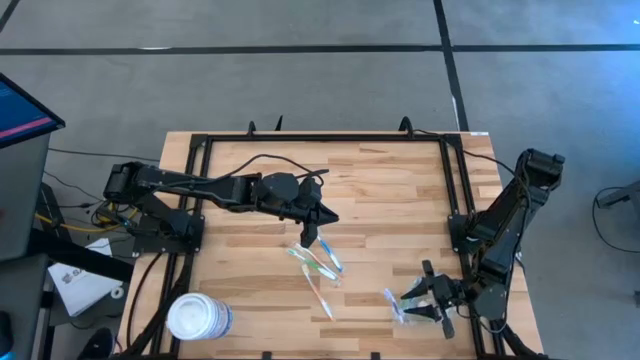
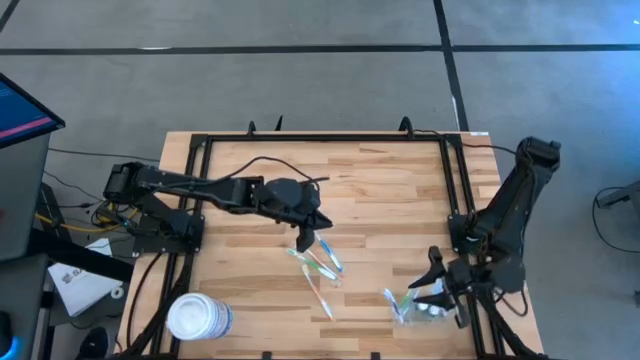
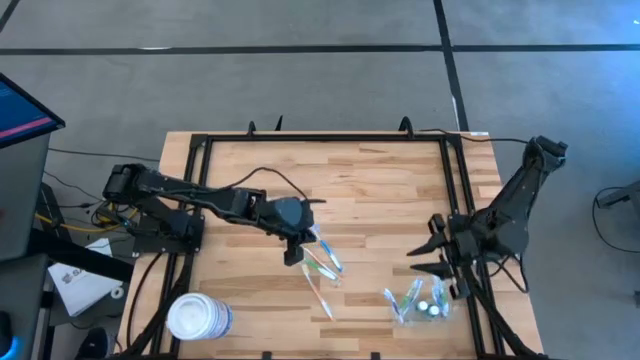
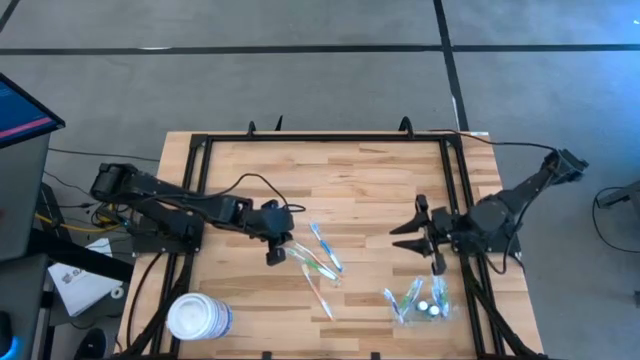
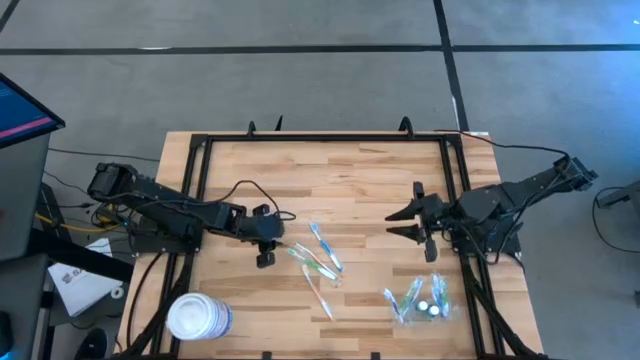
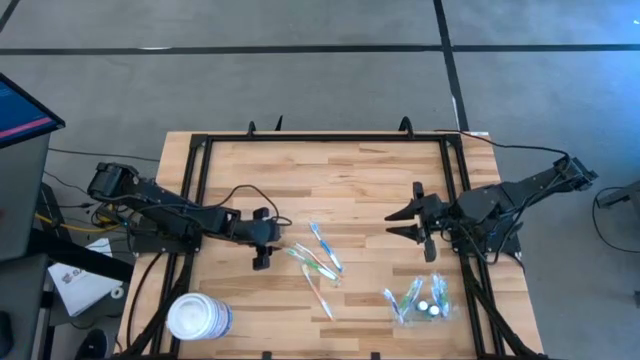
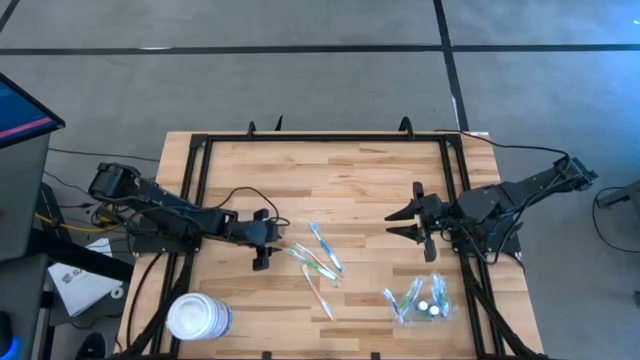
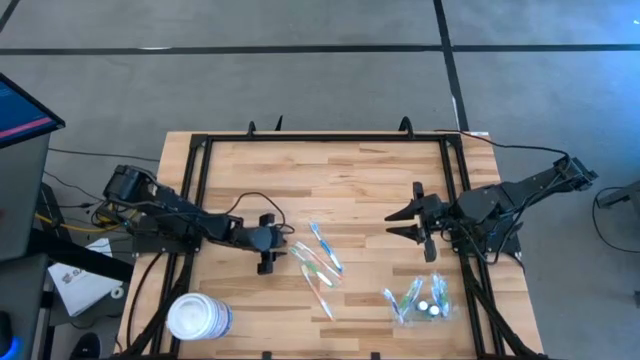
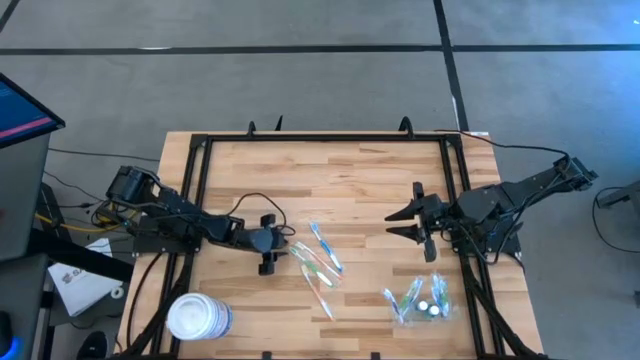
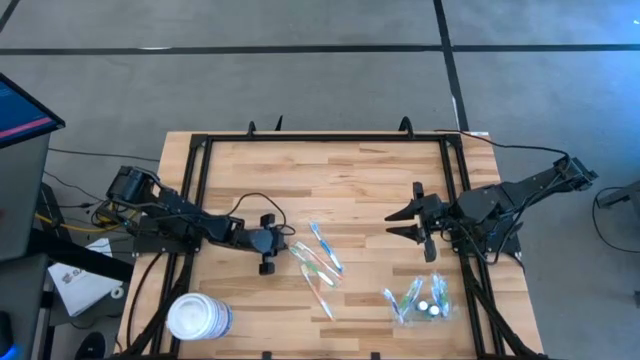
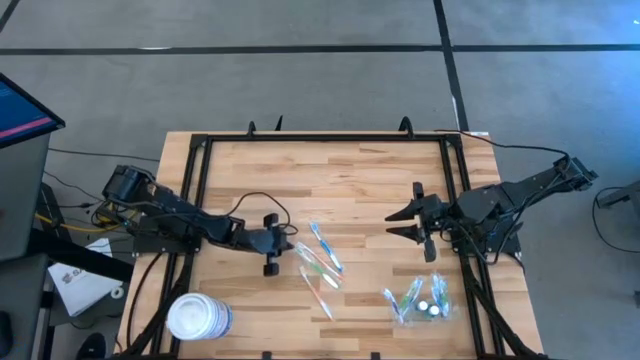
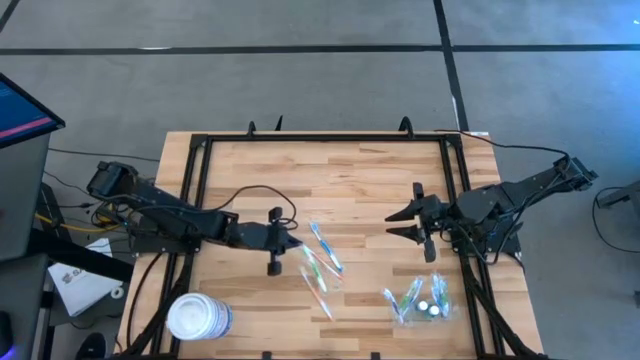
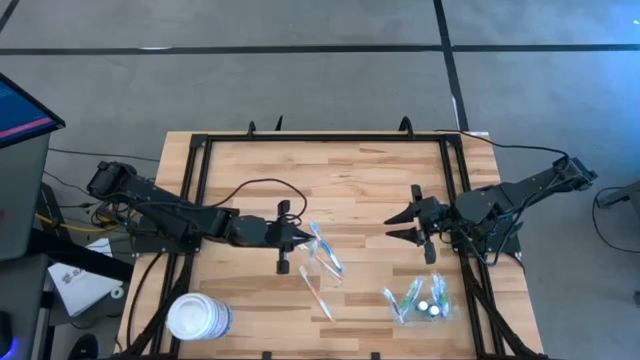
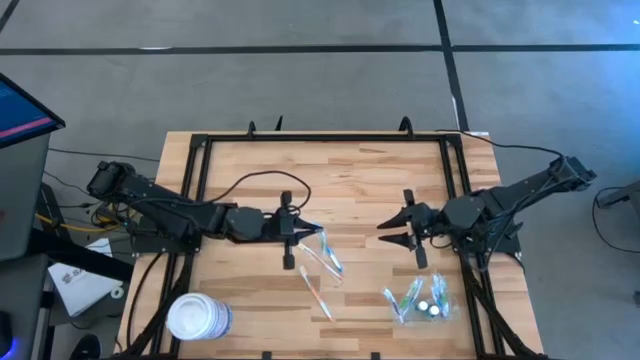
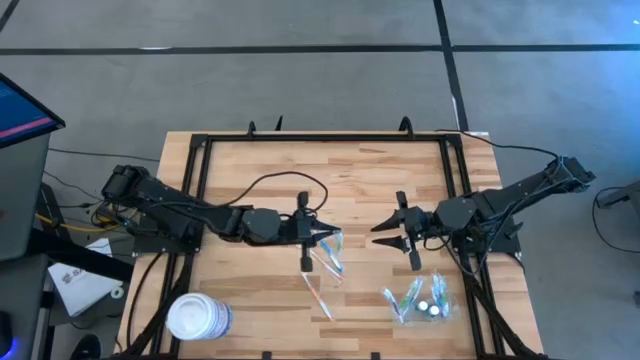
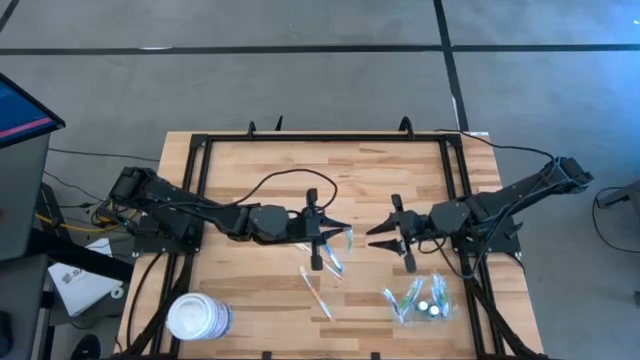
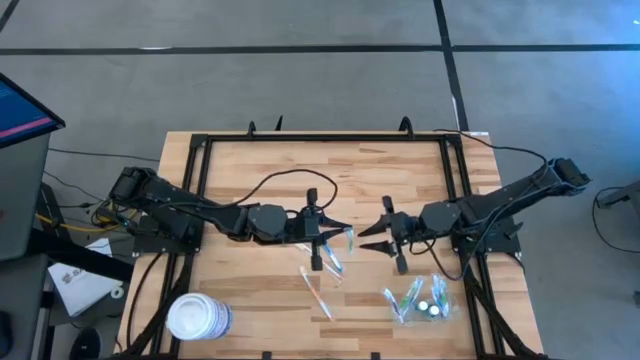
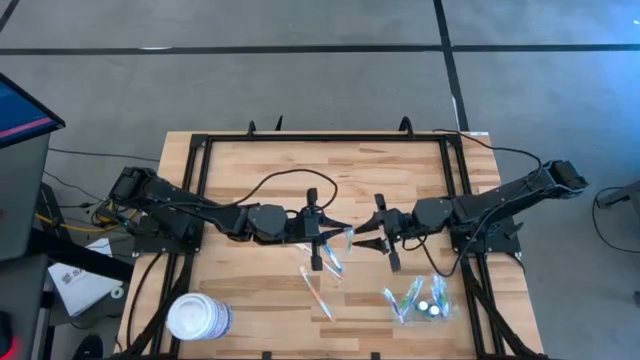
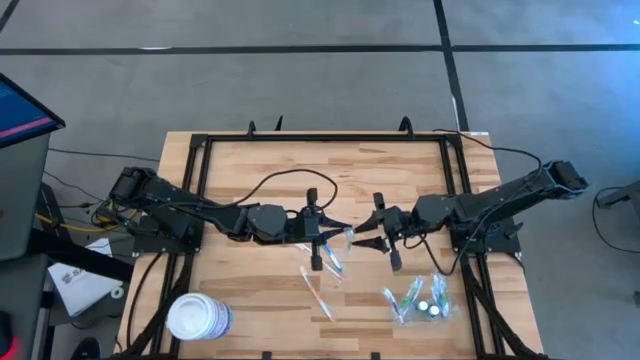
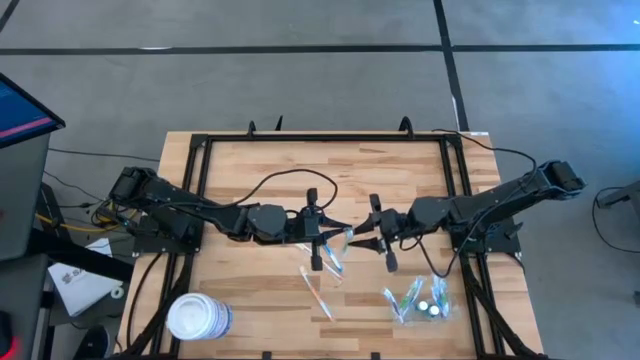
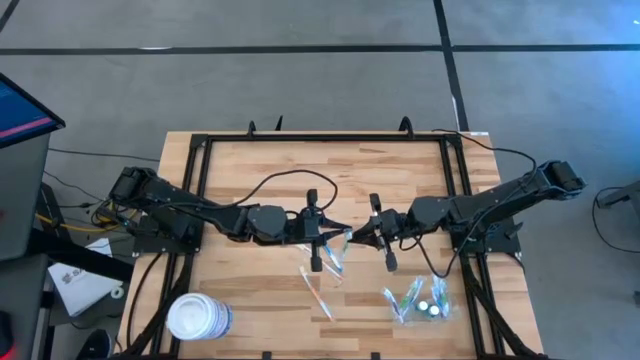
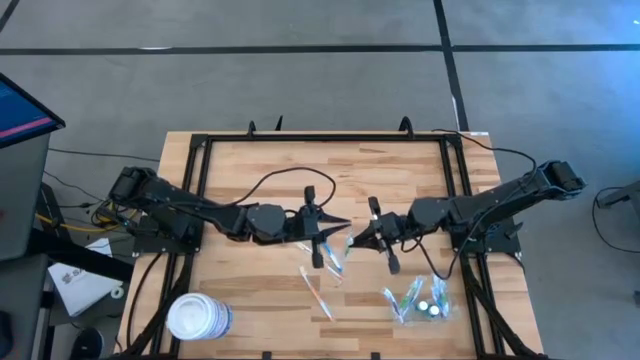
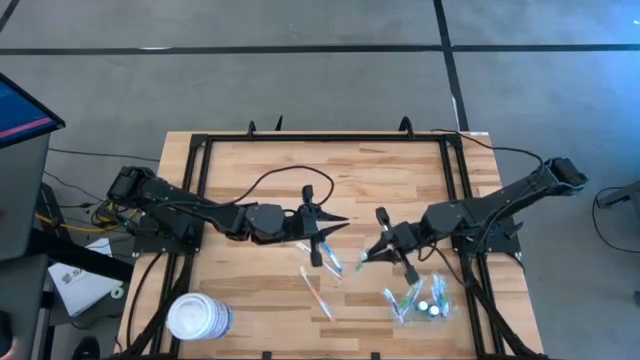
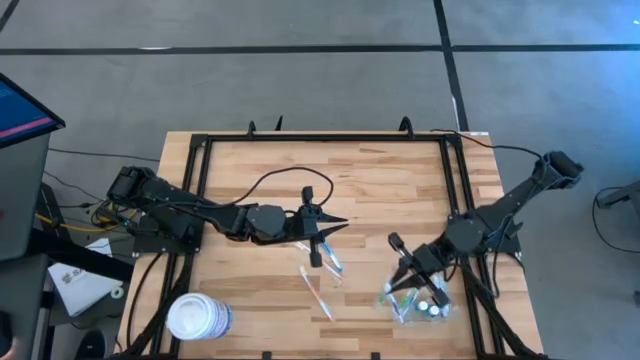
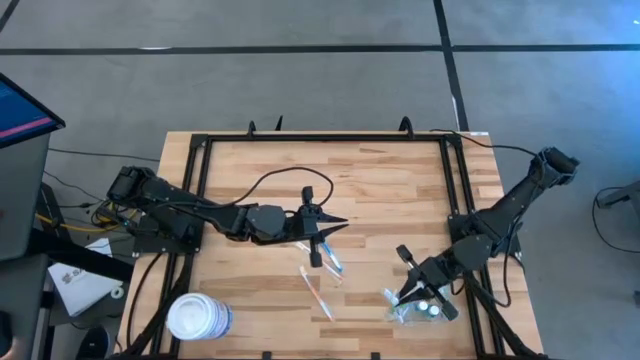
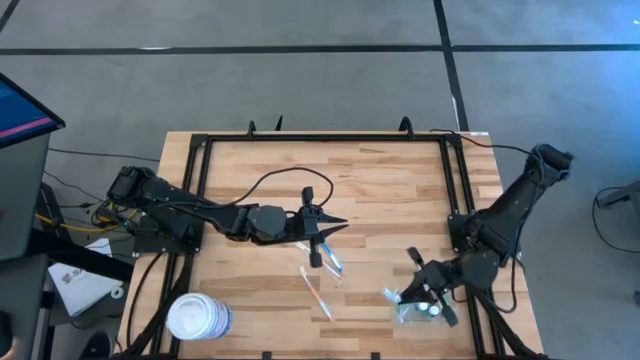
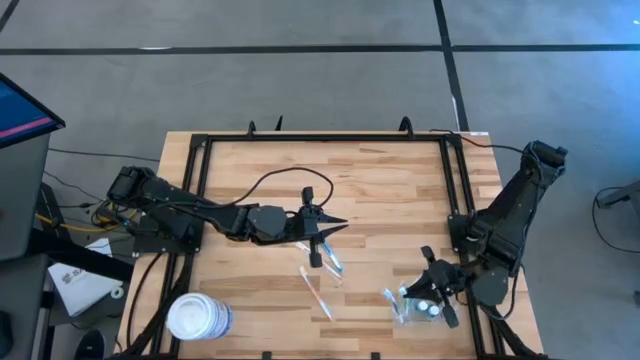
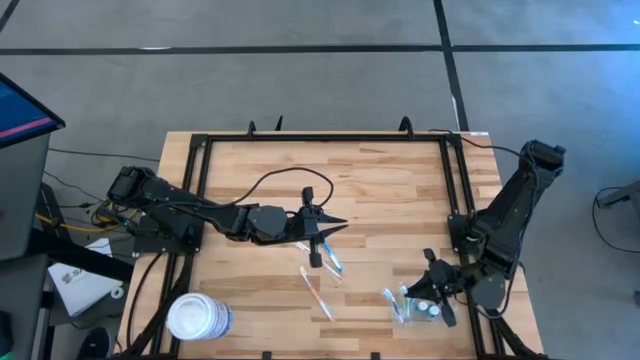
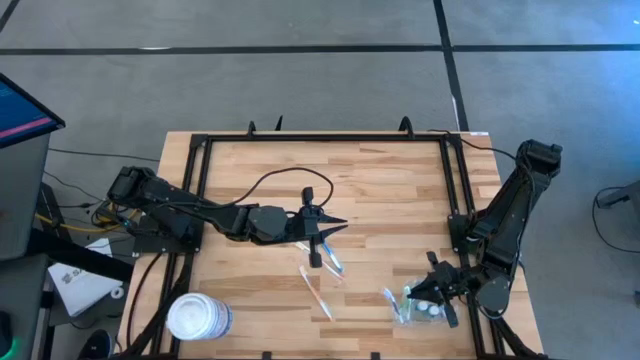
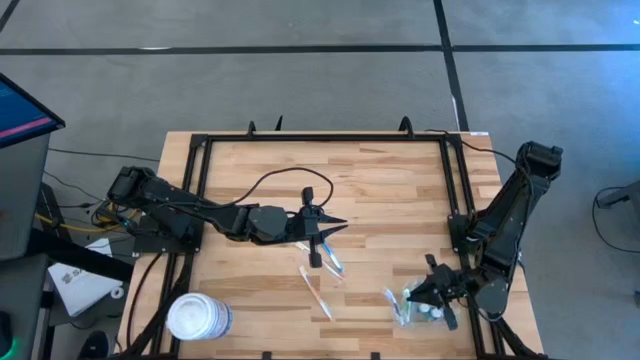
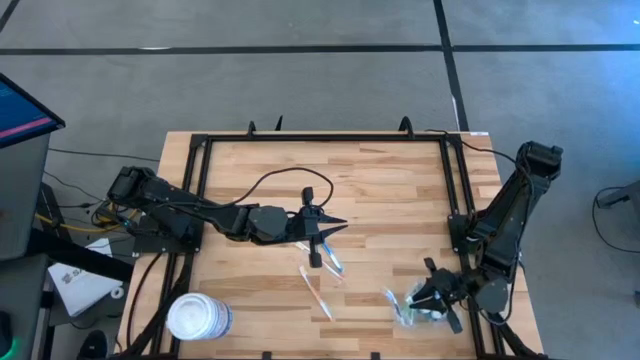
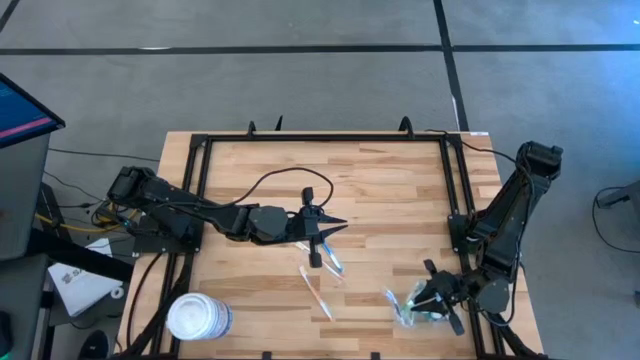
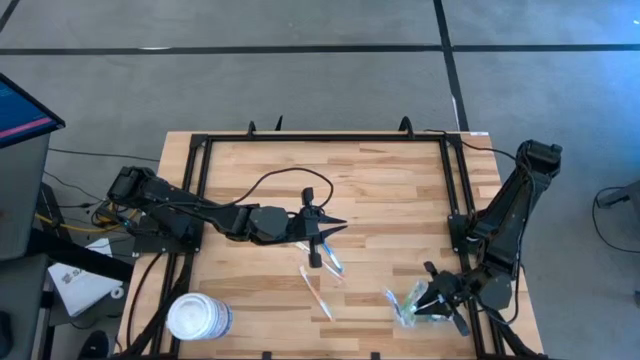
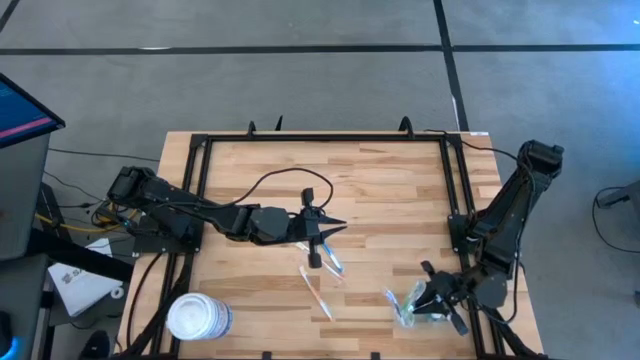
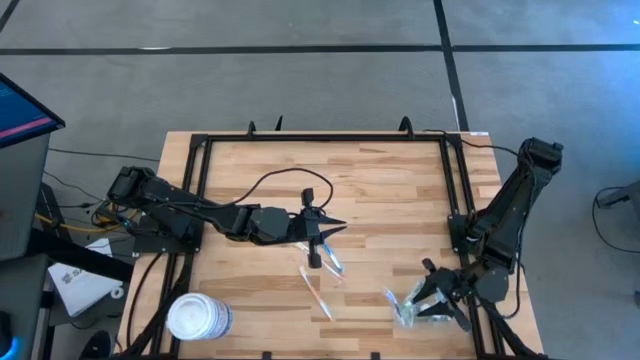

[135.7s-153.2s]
Task: Pick & Place toothbrushing station
Put the green toothbrush into the transparent organizer

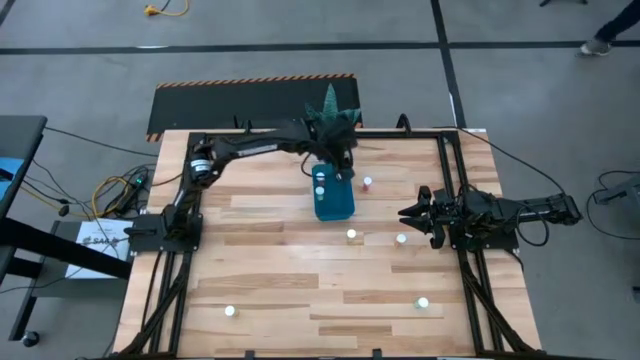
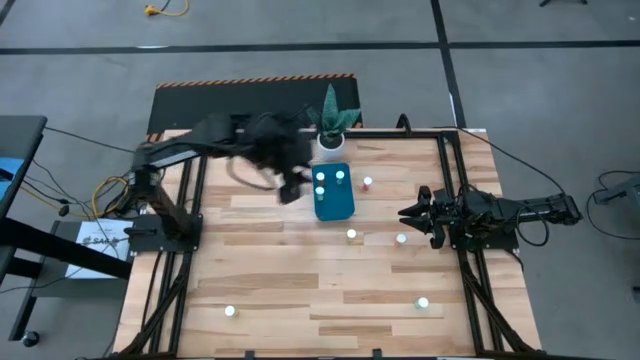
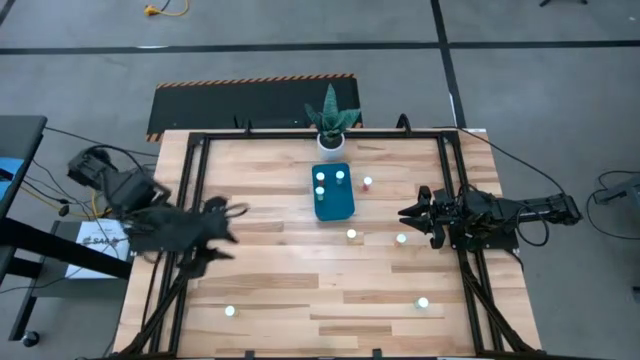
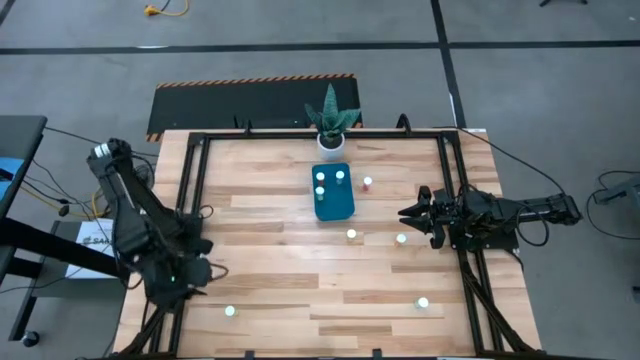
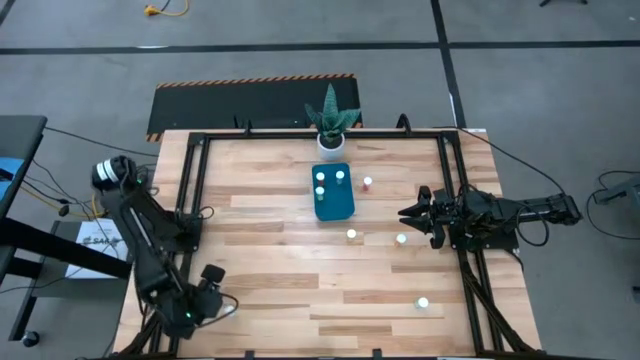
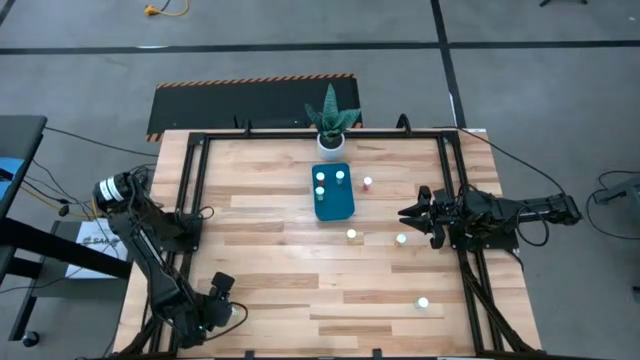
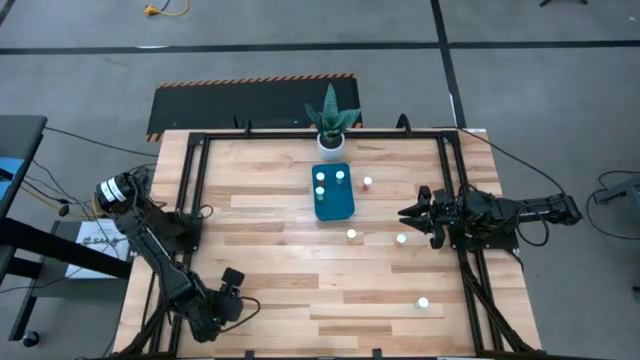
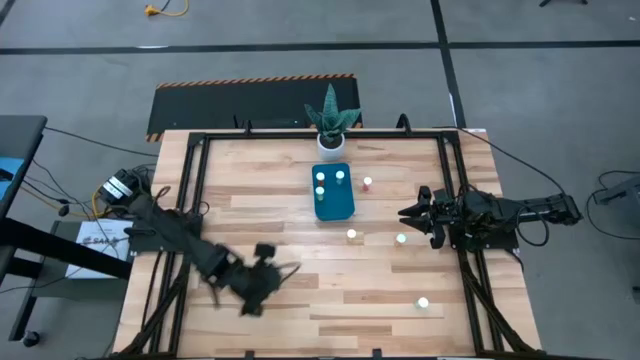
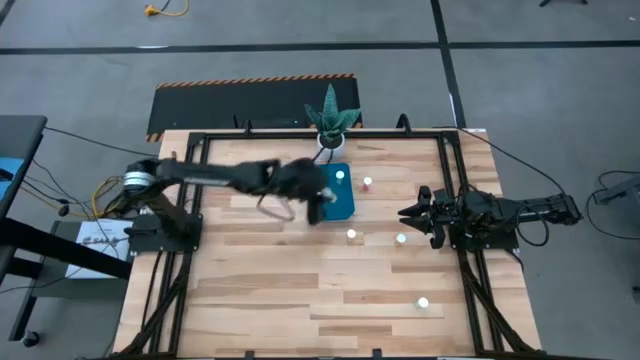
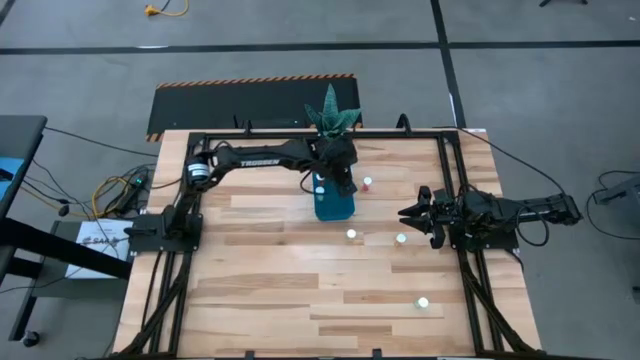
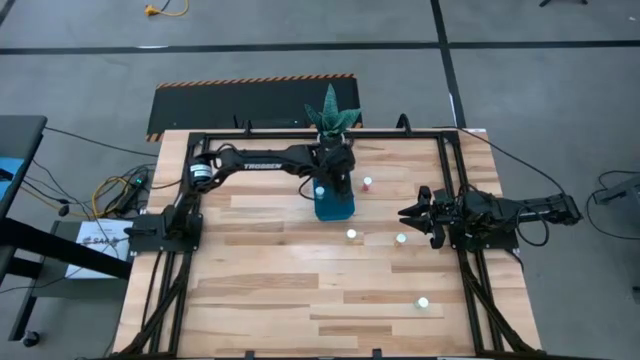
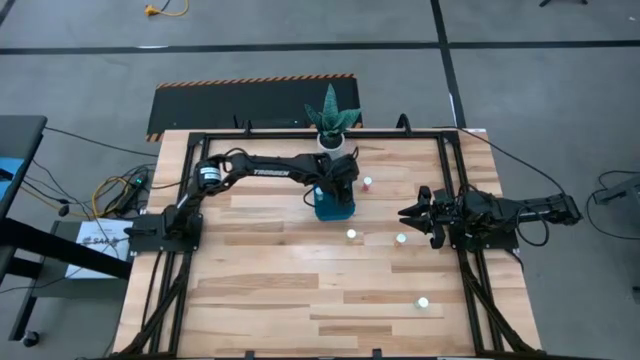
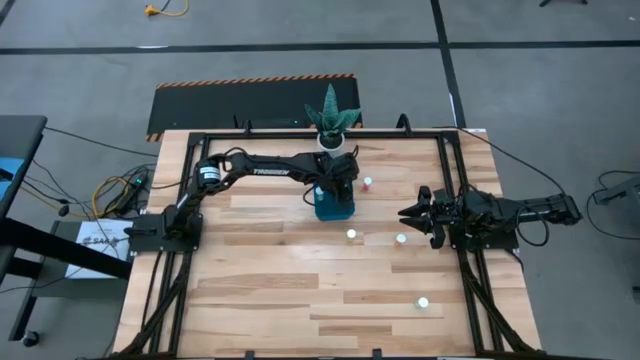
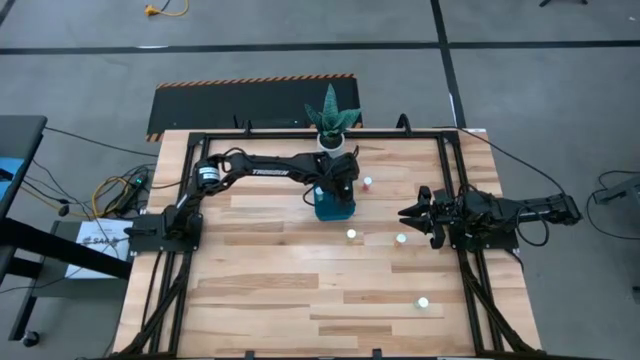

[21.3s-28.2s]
Task: Pick and place pill bottles into a basket
Put the yellow pill bottle into the blue container
